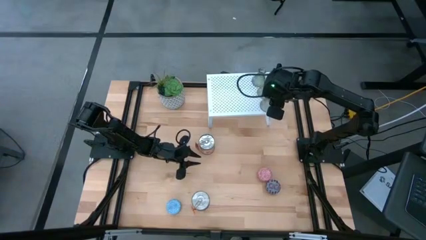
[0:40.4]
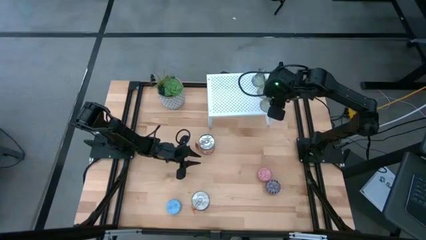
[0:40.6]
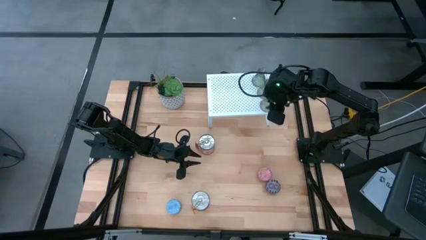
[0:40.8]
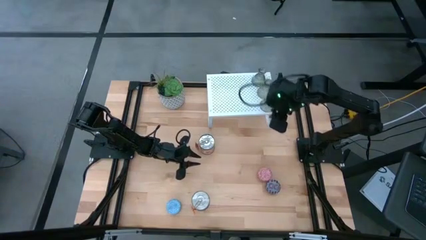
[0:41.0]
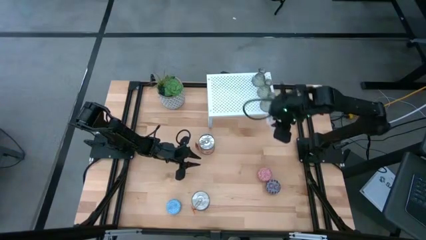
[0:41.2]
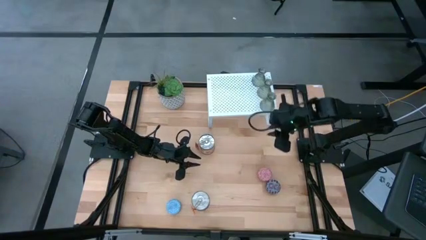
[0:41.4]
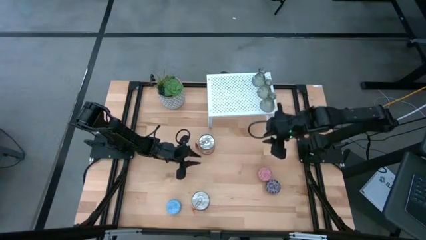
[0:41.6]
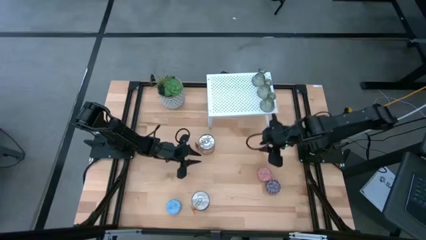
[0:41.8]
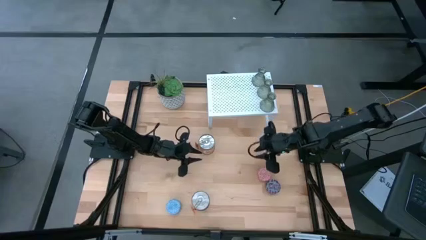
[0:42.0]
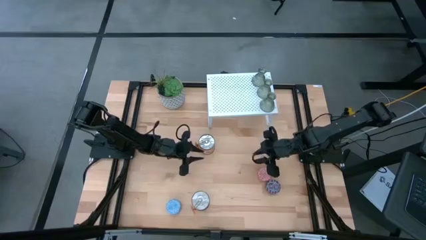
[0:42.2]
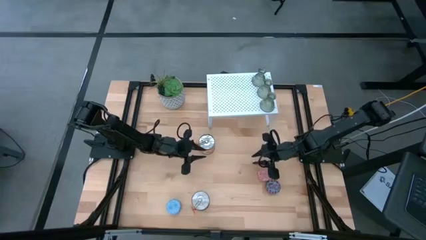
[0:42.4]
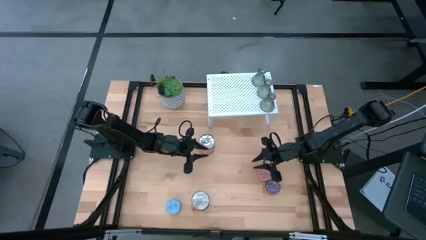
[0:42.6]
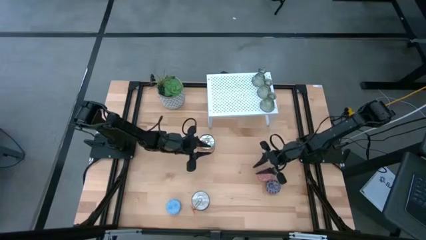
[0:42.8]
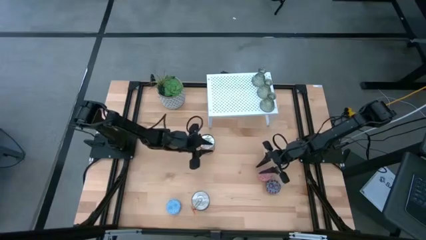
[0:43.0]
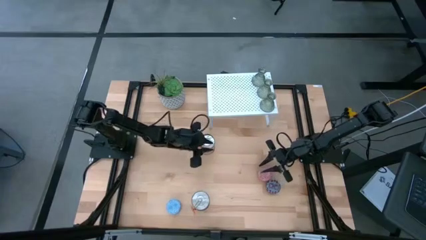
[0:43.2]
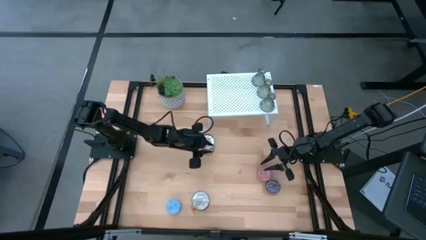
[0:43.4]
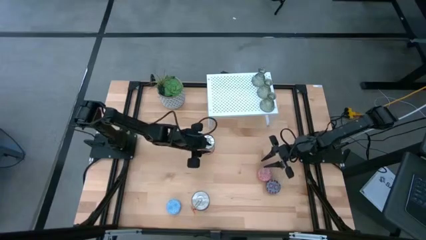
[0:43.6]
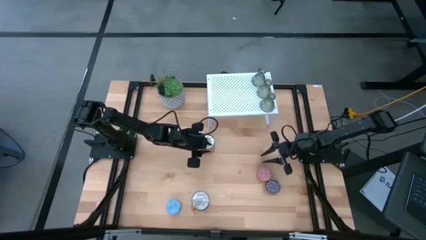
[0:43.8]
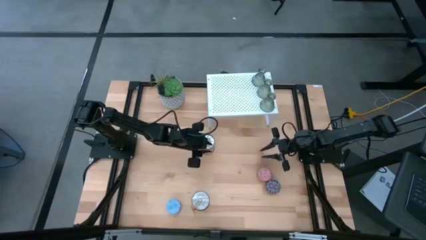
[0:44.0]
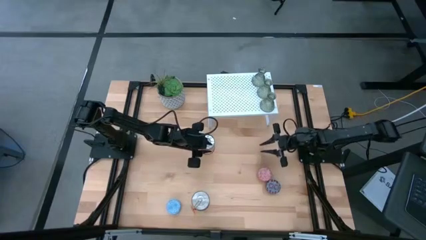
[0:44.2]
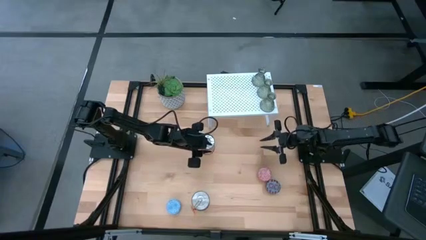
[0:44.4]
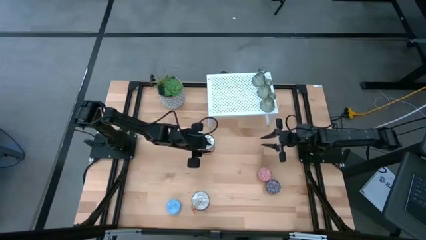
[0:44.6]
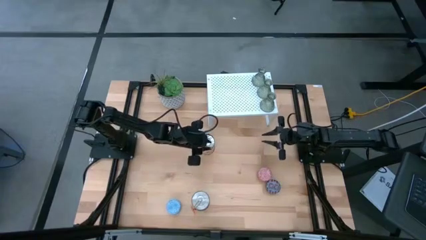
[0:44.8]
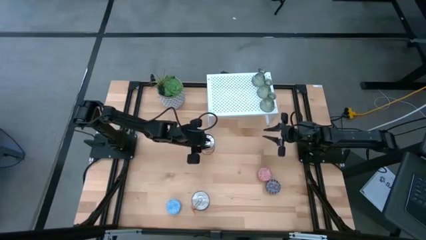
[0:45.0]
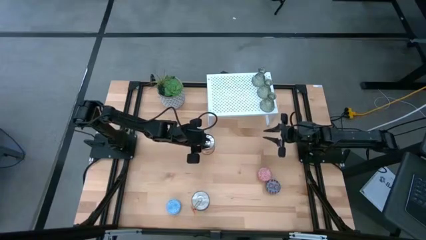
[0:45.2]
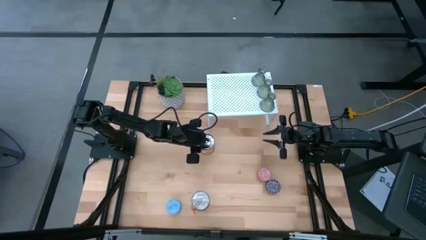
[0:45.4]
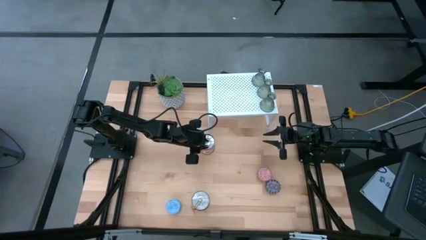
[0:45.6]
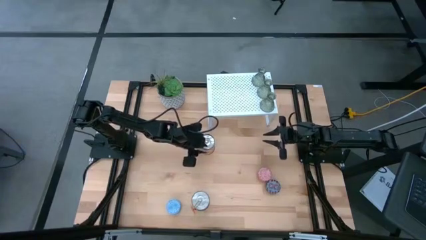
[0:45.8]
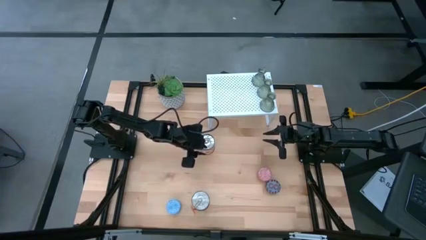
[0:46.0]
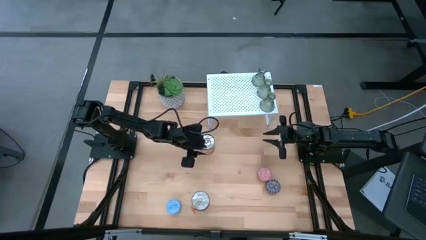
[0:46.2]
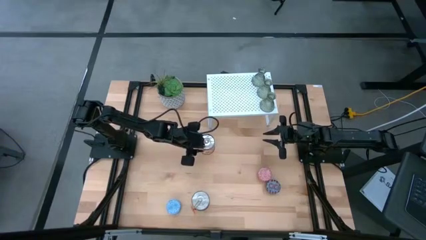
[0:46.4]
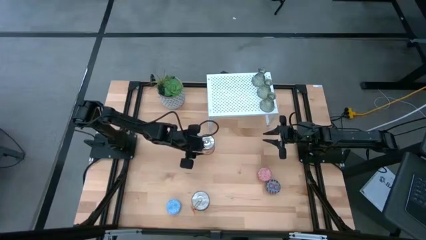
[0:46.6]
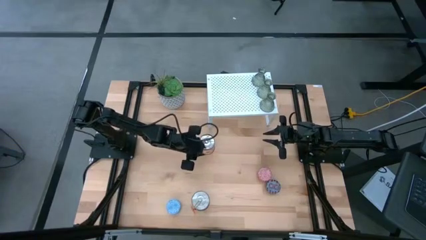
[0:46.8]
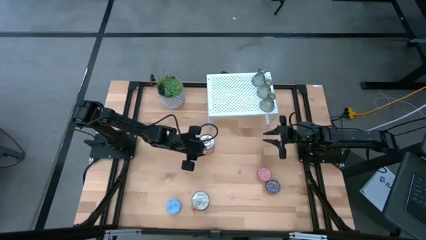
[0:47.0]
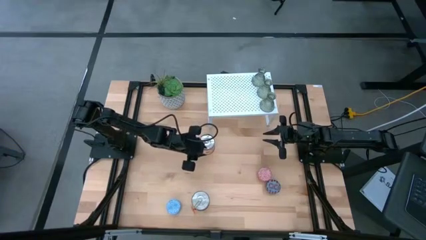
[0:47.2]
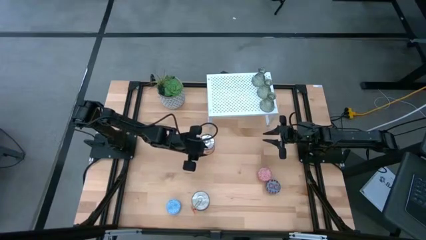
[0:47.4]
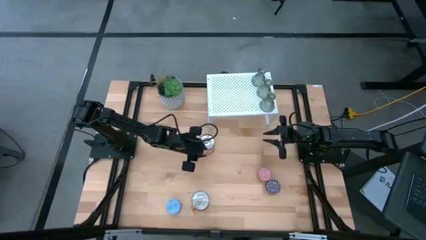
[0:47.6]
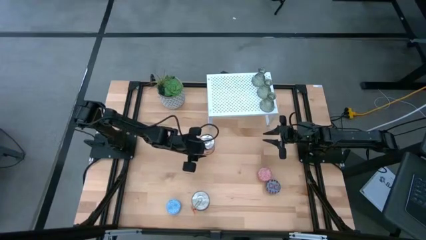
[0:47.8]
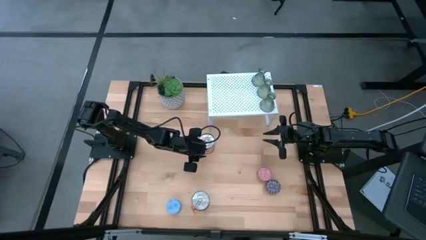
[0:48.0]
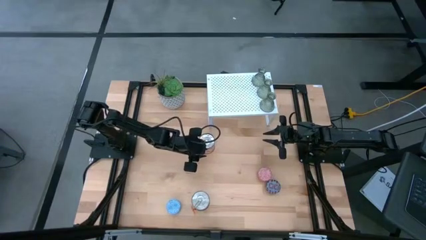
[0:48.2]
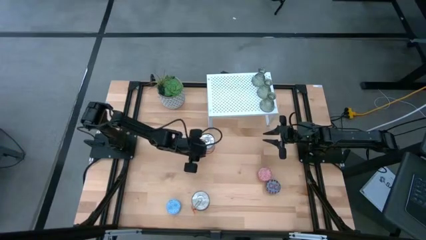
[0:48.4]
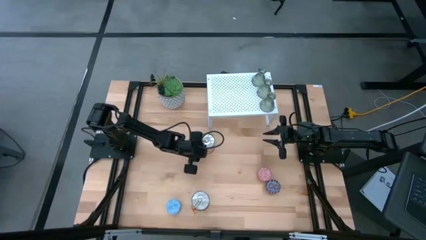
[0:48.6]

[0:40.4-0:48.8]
Task: Pick & Place candle stick holders
Put the top silver scented candle on the shelf

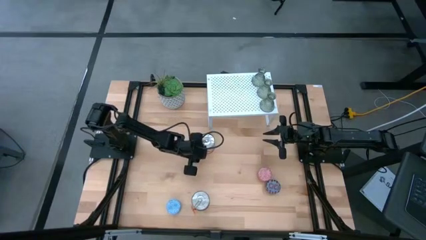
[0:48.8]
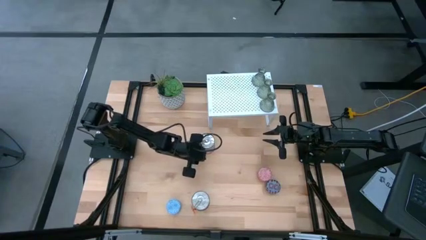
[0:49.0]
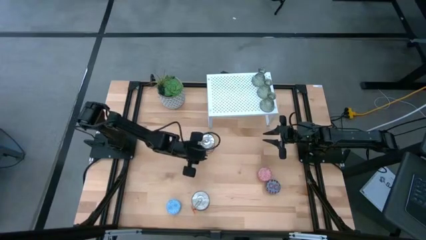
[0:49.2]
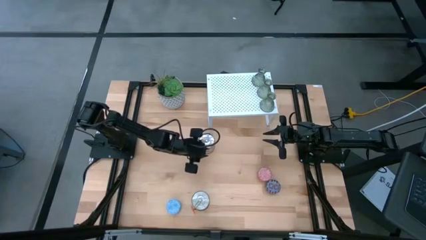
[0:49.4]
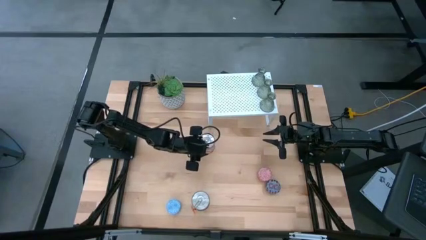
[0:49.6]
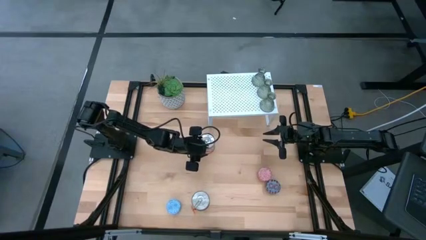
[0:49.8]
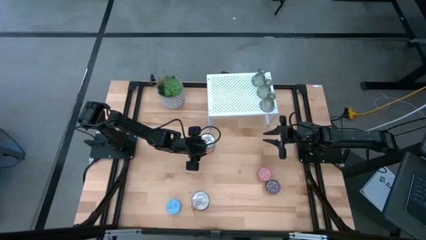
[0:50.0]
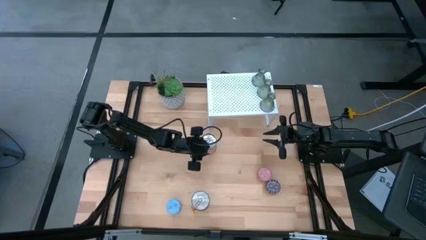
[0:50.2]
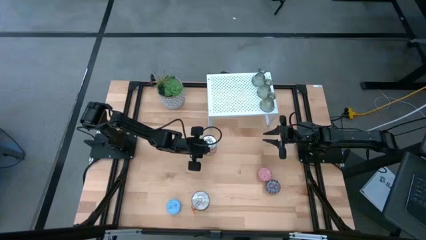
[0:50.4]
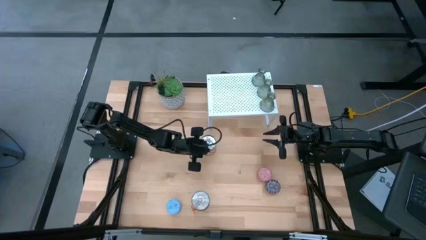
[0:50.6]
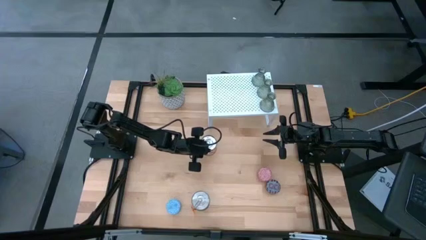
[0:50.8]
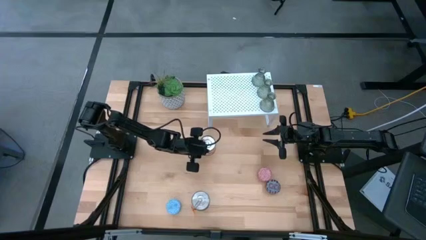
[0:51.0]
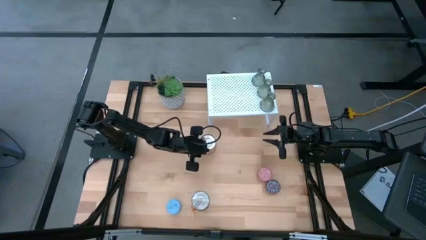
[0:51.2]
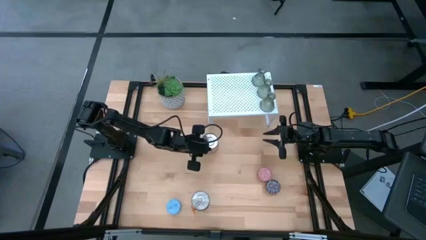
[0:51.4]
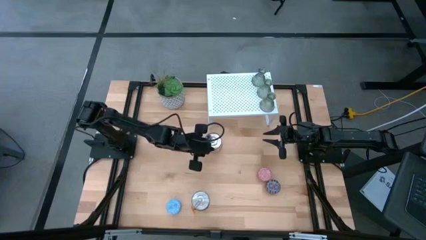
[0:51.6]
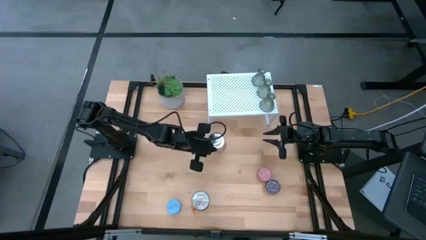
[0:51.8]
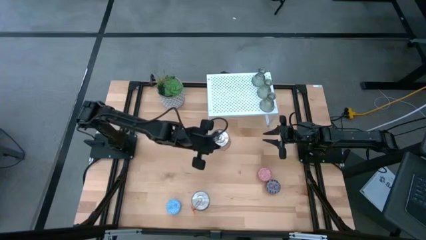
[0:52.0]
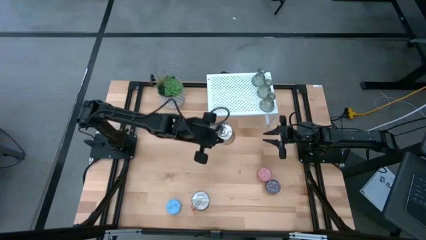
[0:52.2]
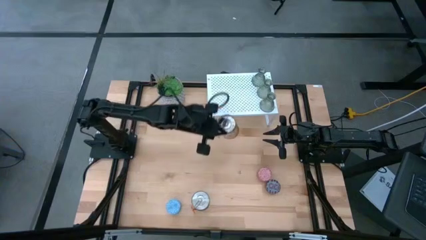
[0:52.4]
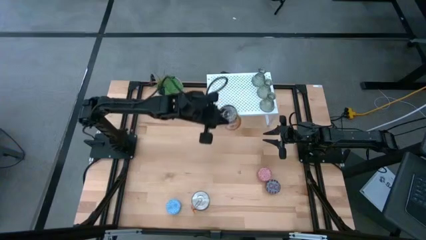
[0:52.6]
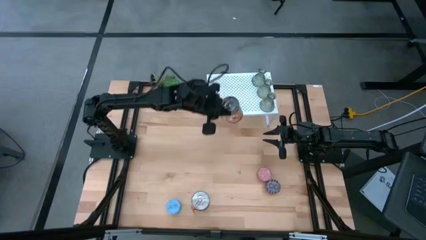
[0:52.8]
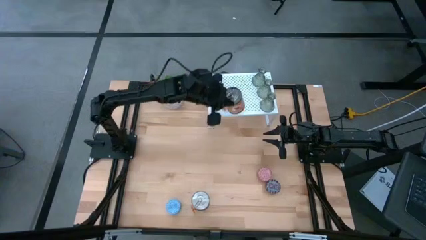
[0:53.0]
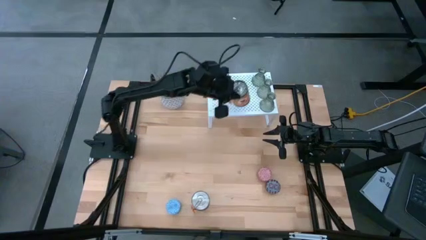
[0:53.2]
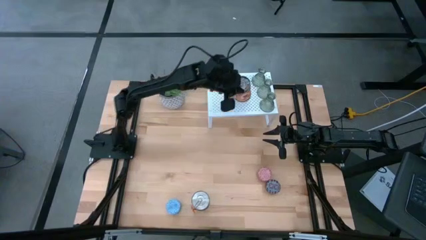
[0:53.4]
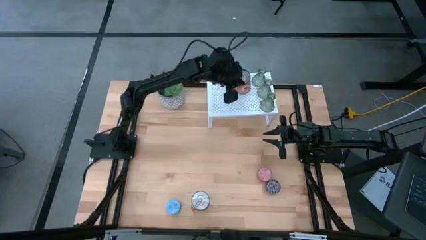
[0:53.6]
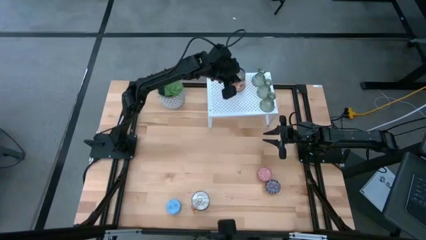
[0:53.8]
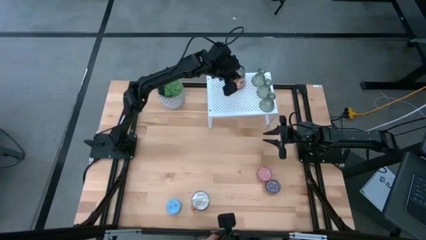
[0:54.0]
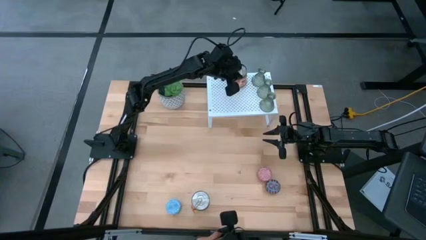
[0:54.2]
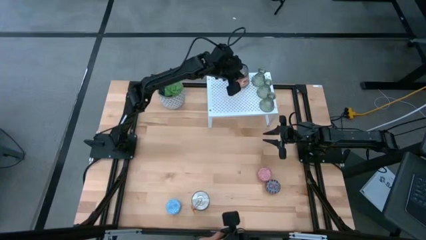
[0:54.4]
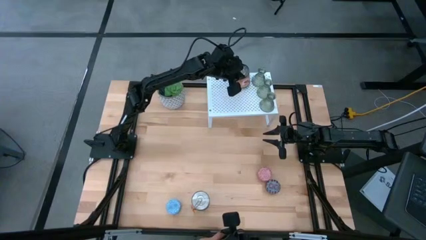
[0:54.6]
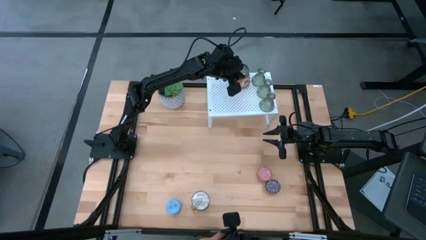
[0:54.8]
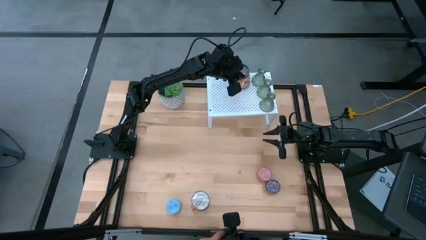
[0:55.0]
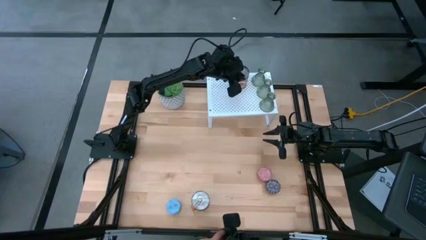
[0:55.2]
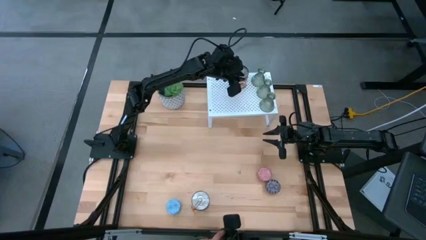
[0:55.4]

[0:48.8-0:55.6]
Put the top silver scented candle on the shelf
